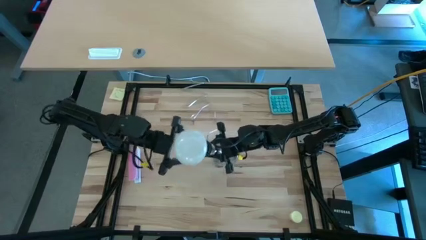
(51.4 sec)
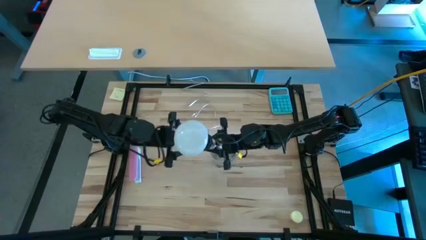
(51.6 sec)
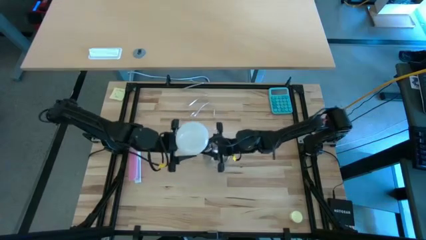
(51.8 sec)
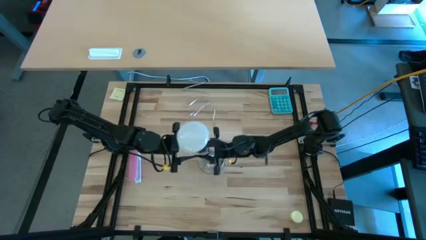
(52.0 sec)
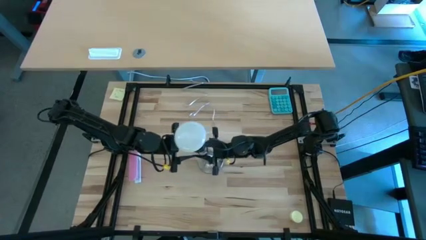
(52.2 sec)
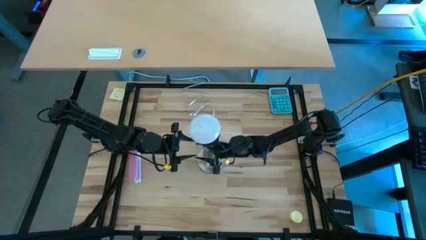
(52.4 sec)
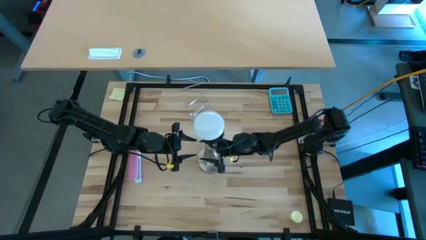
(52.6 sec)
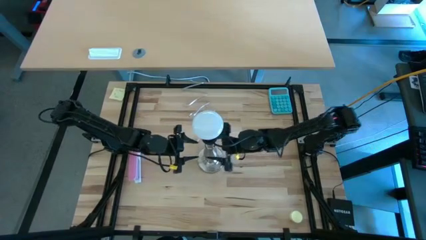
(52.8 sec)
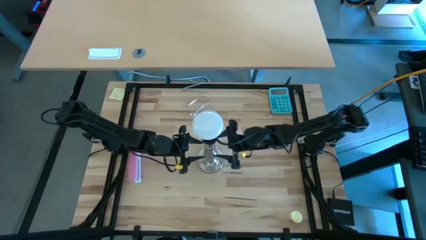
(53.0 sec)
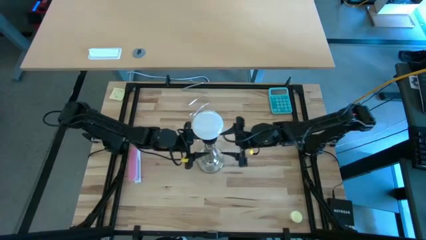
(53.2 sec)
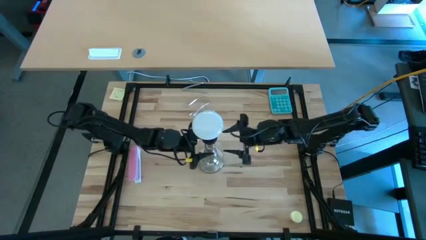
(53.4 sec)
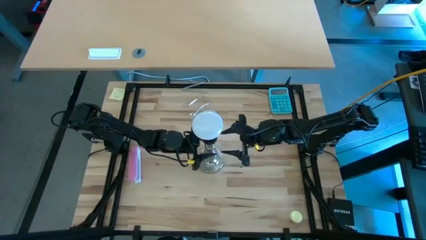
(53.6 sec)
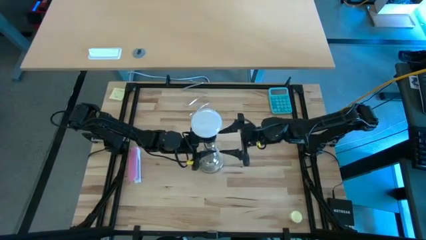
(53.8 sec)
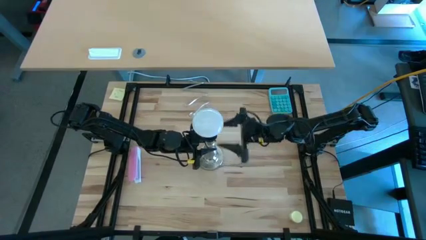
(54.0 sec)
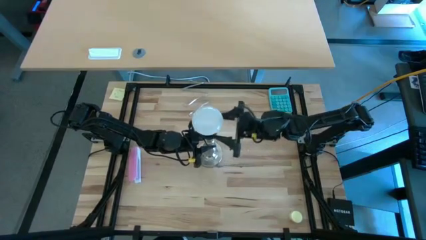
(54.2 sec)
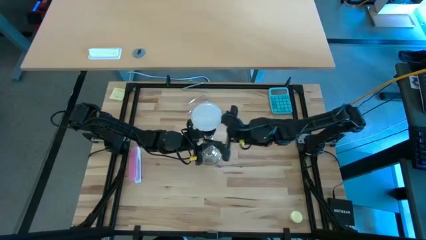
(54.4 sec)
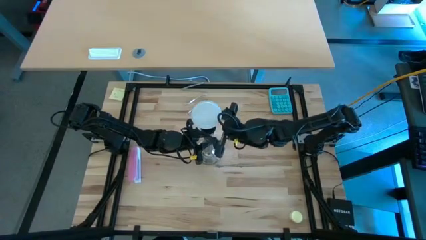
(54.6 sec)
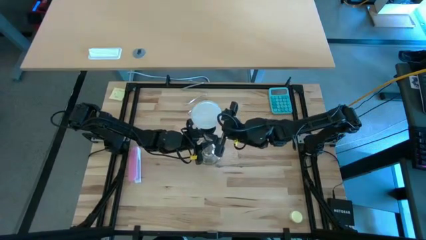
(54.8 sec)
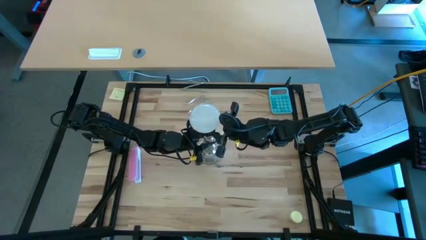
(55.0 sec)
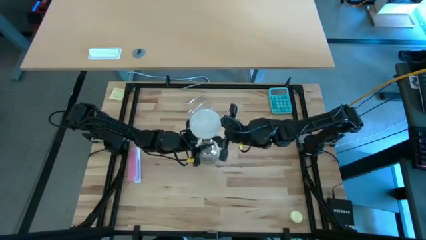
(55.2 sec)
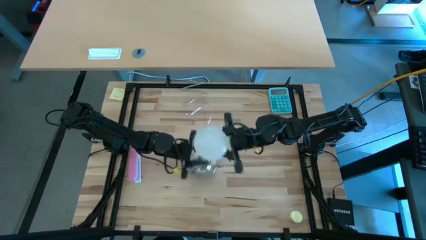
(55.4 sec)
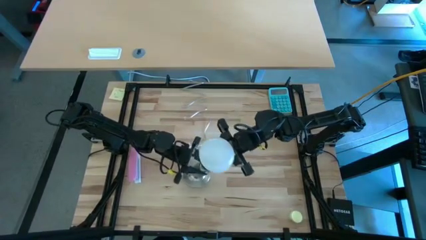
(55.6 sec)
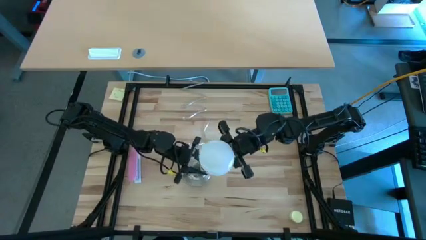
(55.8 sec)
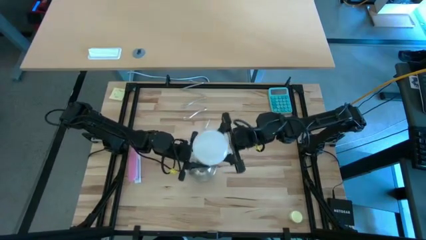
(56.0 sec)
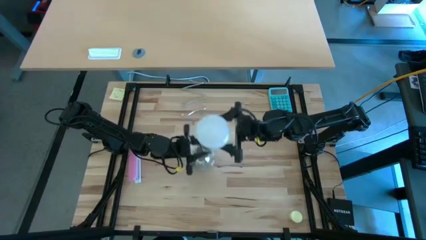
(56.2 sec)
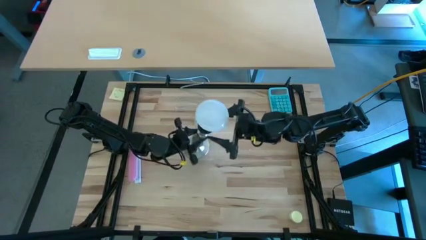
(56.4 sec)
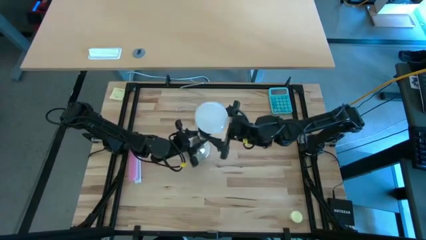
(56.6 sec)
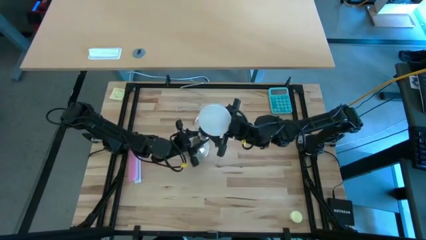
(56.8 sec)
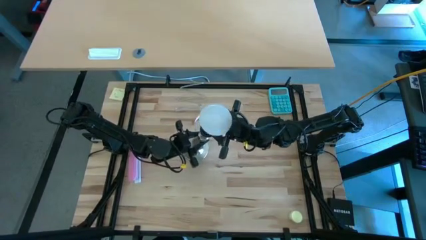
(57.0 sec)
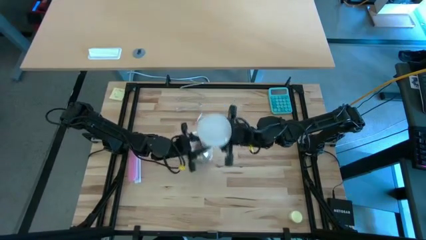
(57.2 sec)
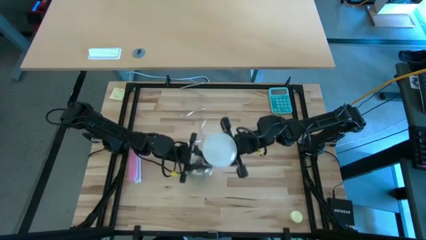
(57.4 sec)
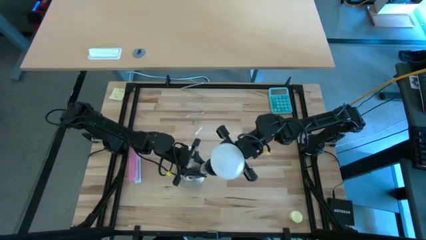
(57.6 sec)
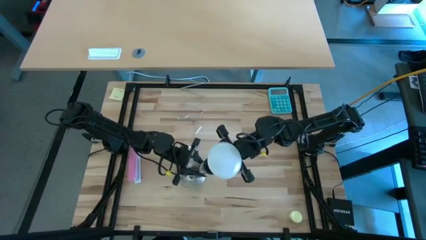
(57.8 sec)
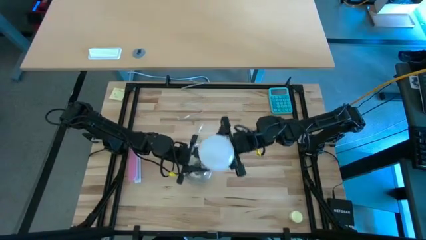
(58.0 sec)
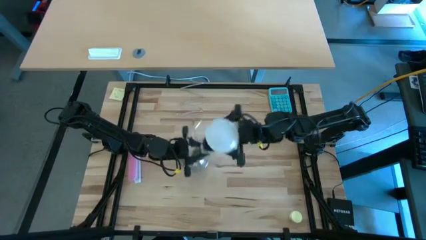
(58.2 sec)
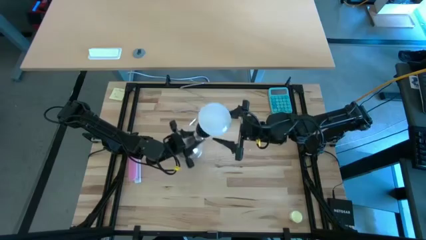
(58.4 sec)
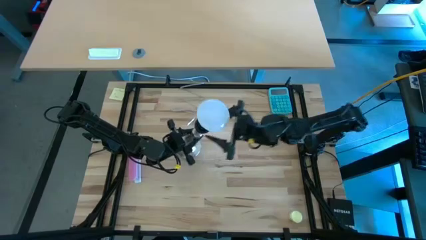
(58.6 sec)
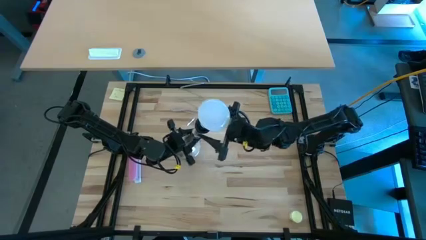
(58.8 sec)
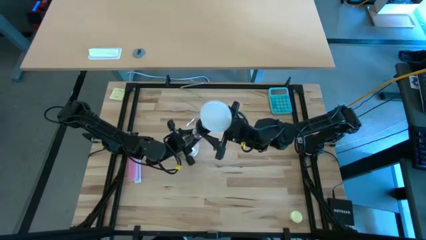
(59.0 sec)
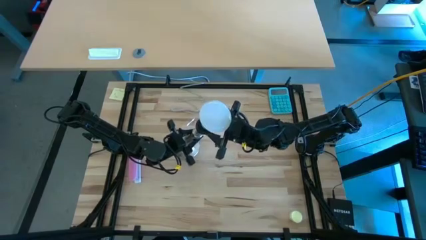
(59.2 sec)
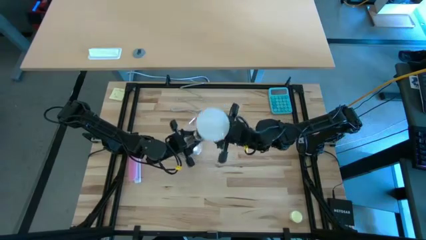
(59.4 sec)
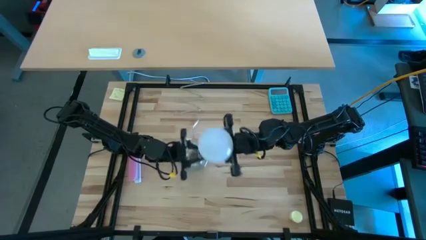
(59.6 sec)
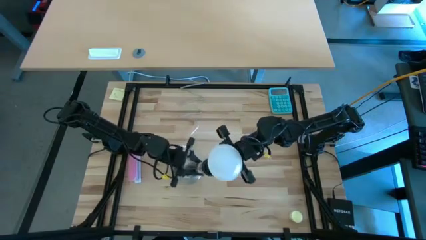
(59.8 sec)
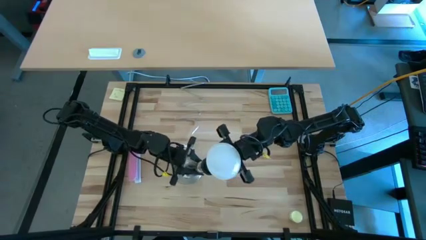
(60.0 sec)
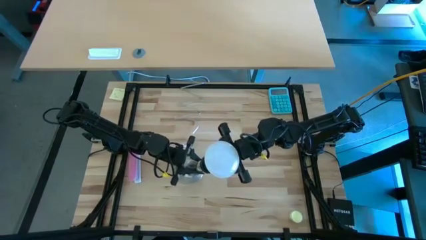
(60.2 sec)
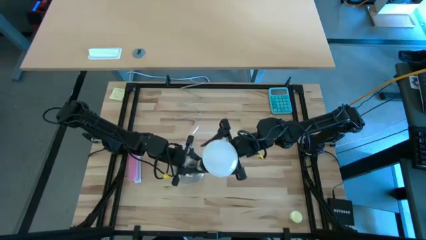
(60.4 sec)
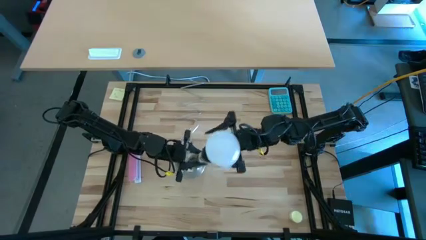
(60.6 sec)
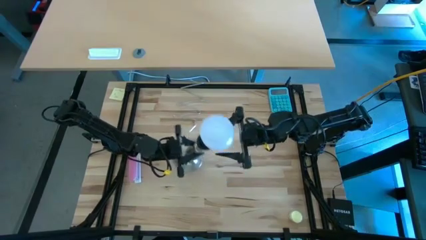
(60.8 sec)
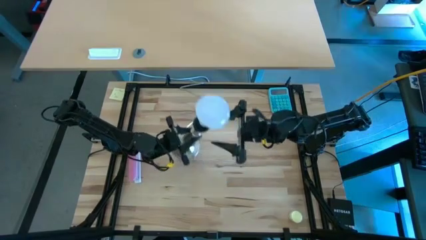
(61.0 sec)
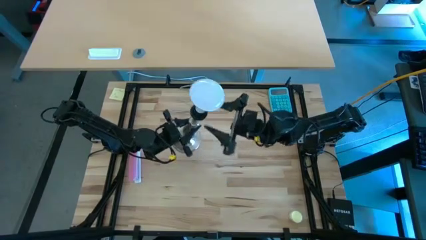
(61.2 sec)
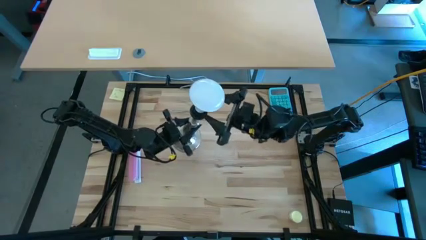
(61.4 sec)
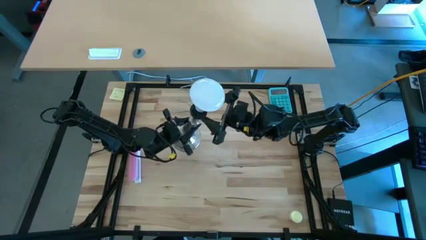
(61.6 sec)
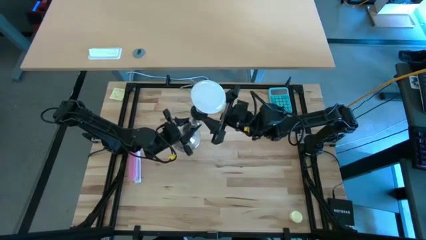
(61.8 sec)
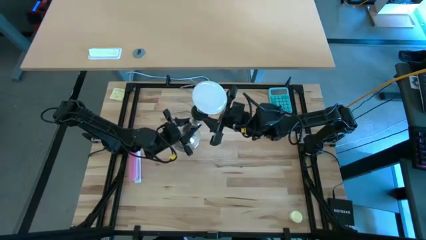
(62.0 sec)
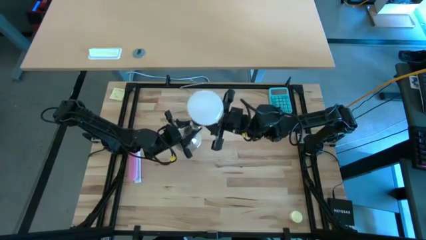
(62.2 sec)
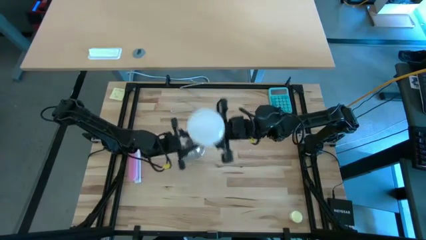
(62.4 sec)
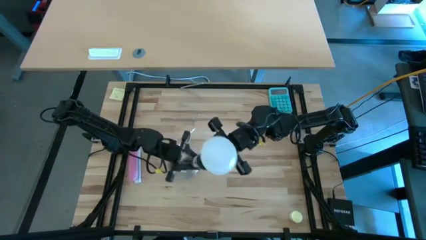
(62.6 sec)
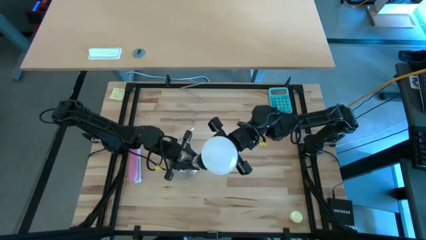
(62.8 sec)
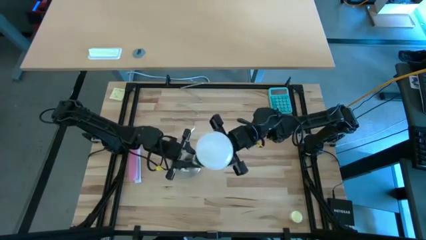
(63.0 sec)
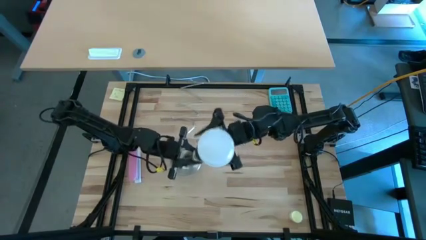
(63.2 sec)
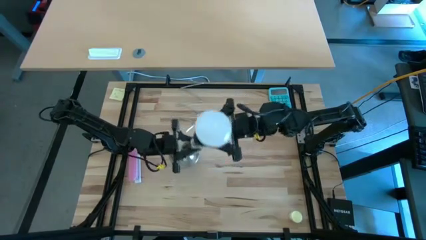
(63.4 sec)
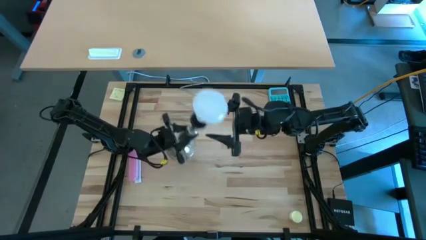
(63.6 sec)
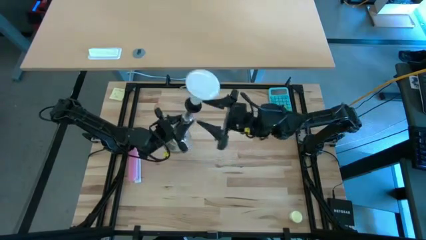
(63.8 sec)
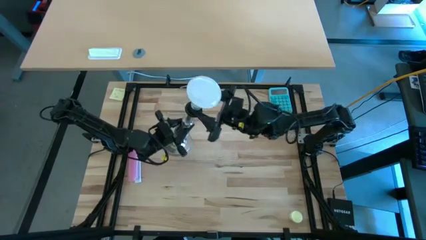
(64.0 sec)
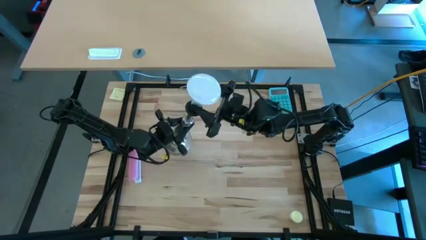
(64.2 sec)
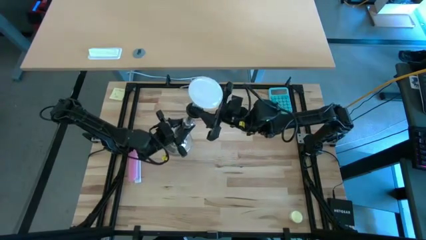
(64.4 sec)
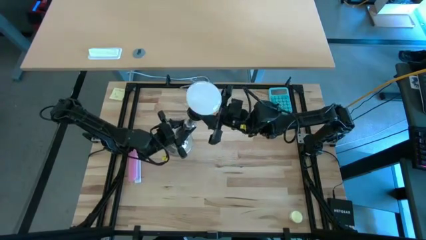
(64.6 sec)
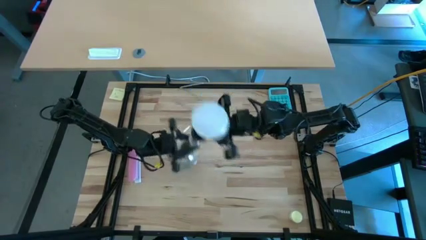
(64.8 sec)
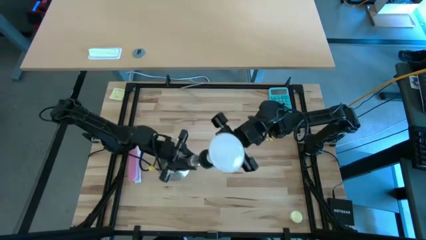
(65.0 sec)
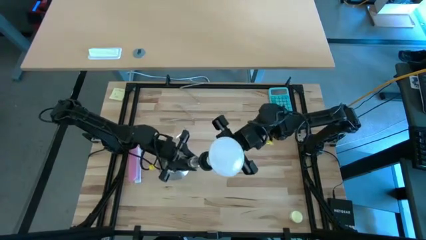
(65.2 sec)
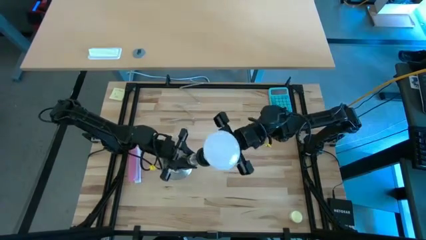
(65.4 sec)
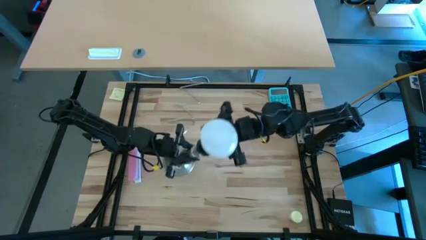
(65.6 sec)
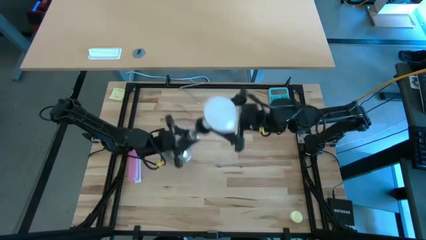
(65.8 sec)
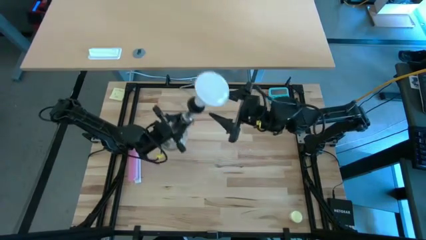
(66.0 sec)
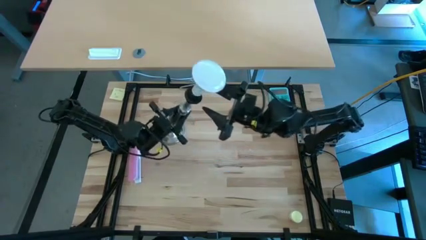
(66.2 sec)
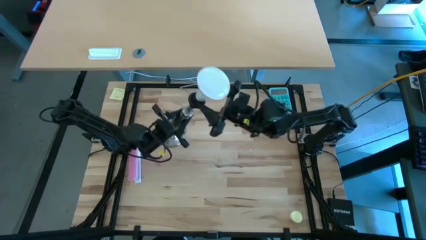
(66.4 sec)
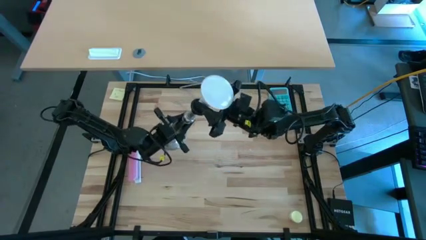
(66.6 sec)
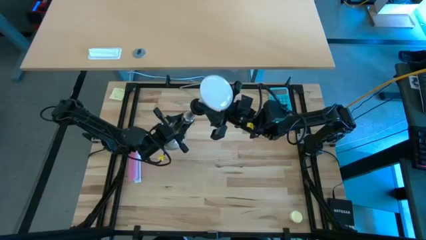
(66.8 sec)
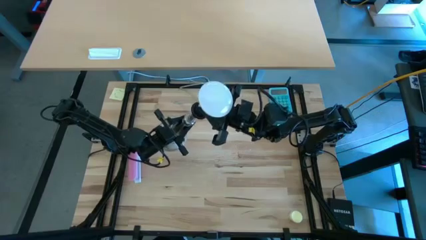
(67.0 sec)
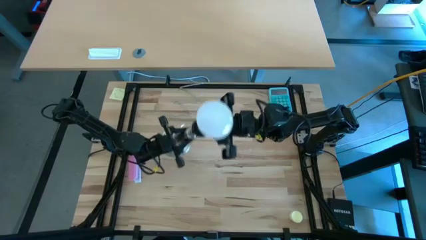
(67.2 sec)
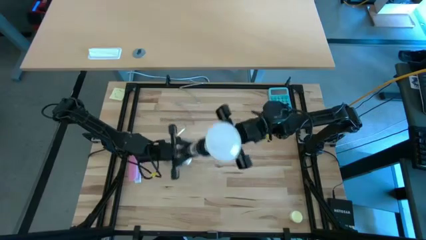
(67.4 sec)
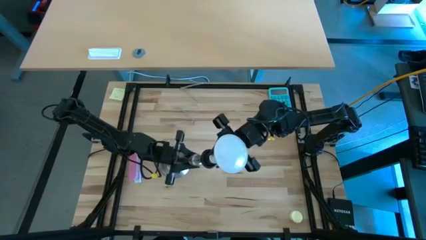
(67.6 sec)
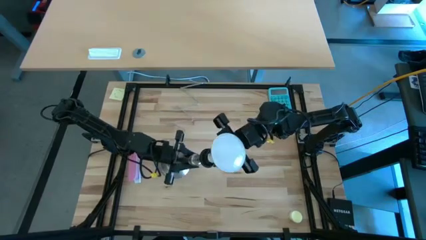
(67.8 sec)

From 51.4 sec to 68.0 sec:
Task: Screw lightbulb
Remove the white lightbulb from the silver lamp
